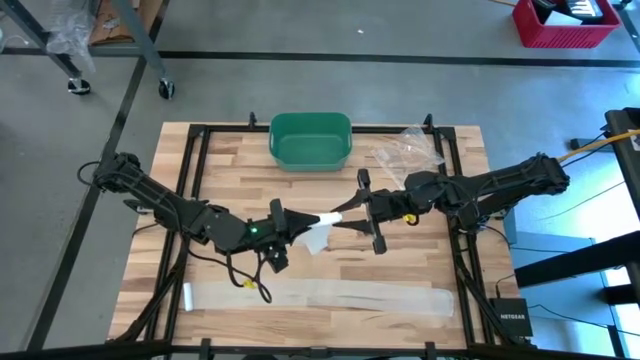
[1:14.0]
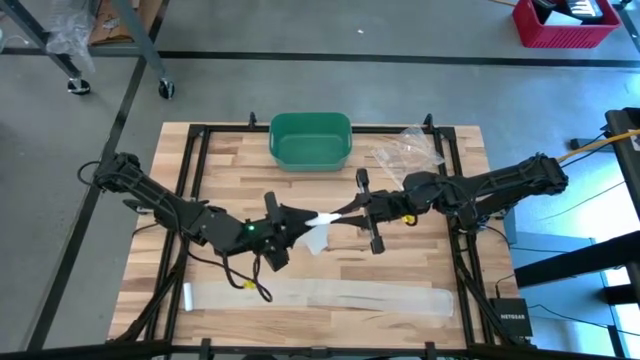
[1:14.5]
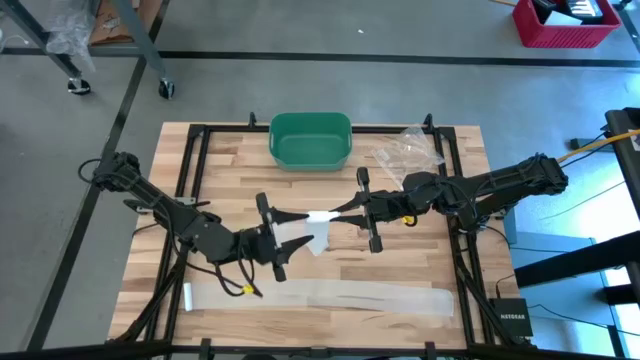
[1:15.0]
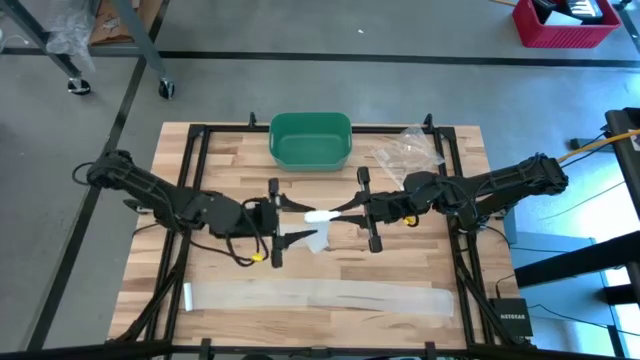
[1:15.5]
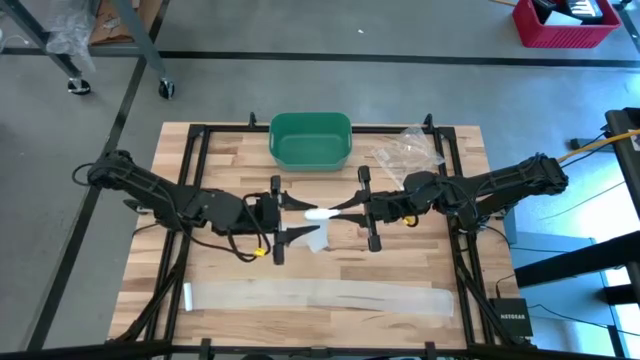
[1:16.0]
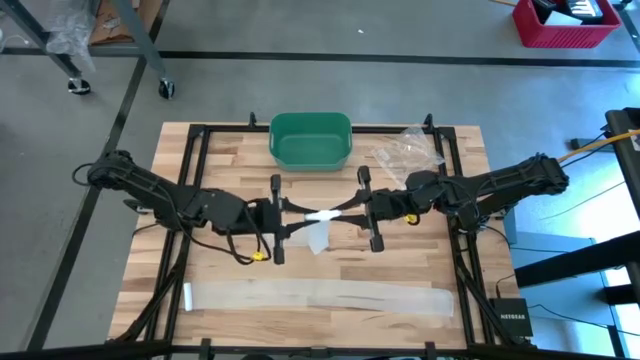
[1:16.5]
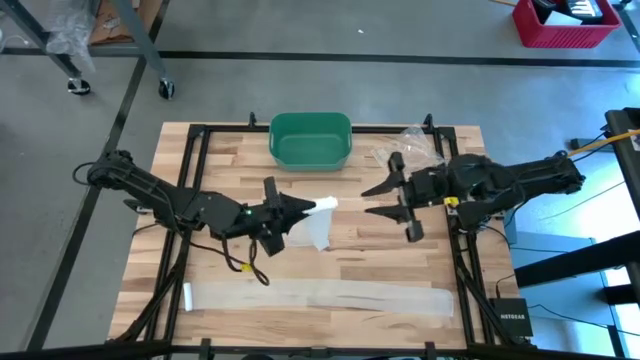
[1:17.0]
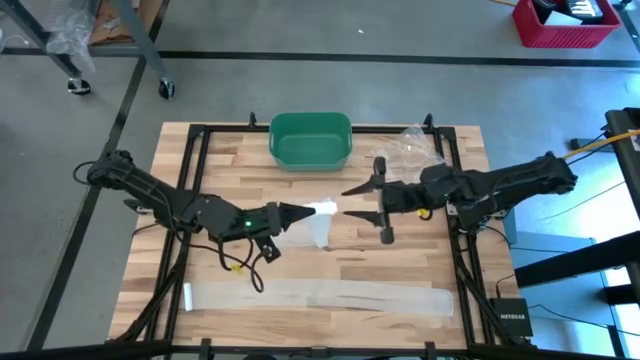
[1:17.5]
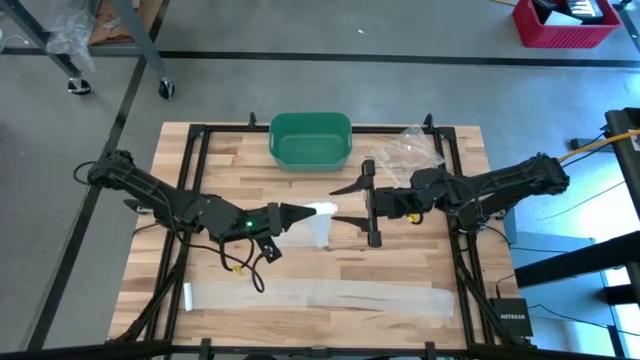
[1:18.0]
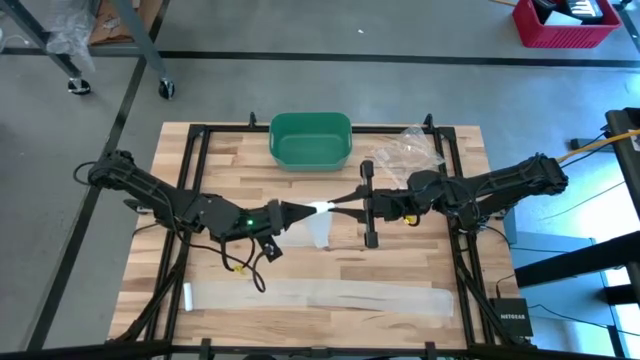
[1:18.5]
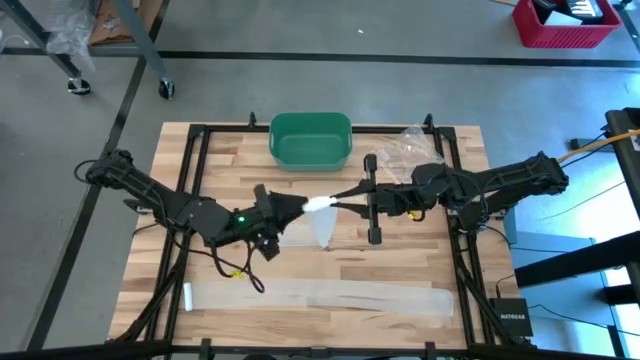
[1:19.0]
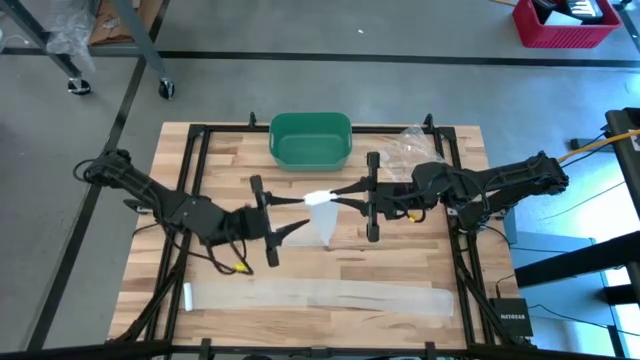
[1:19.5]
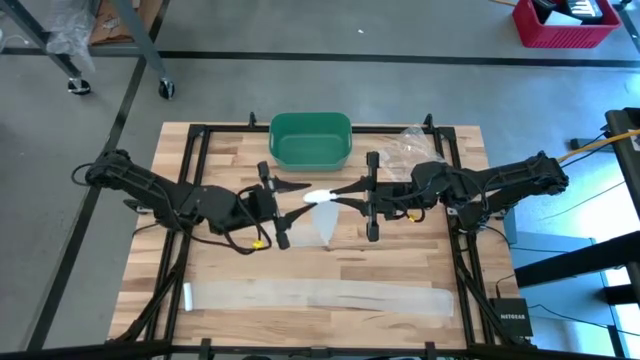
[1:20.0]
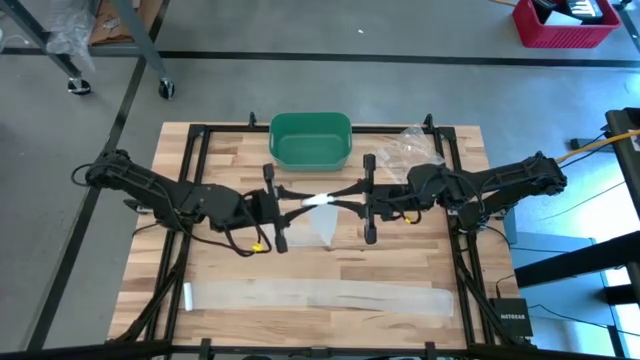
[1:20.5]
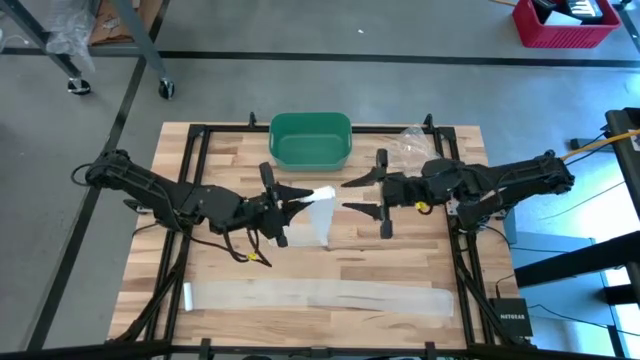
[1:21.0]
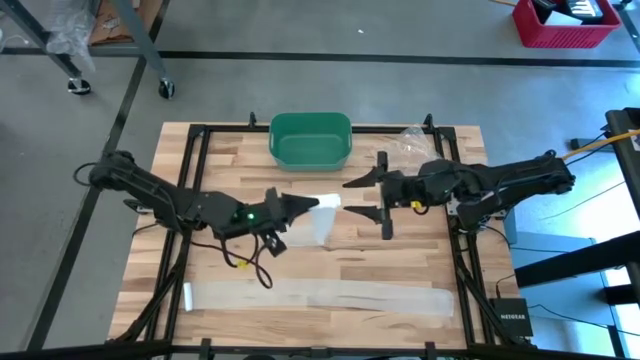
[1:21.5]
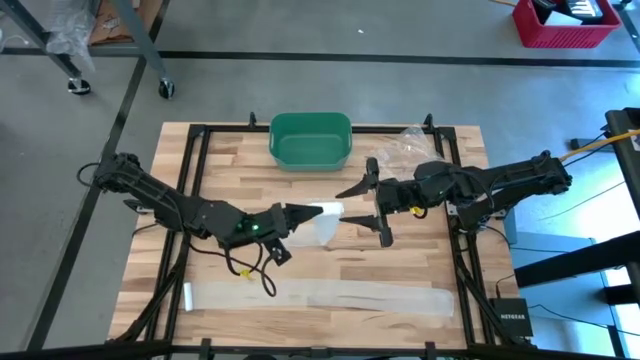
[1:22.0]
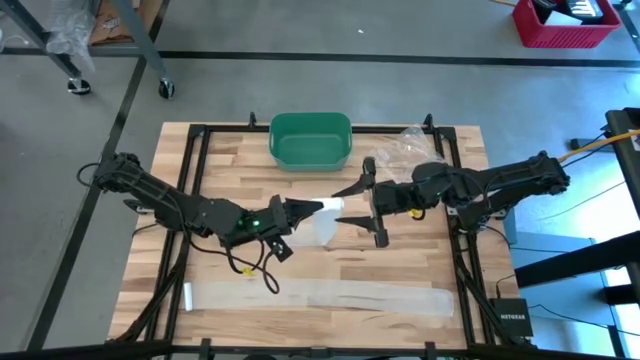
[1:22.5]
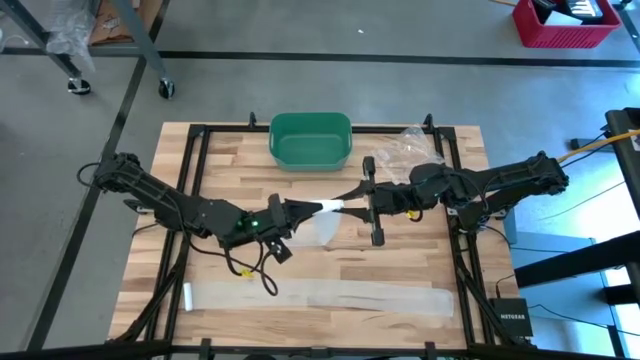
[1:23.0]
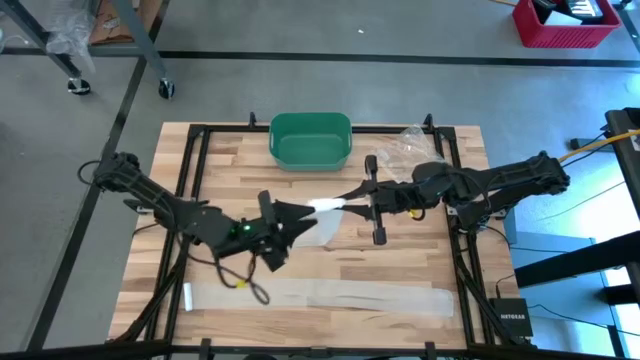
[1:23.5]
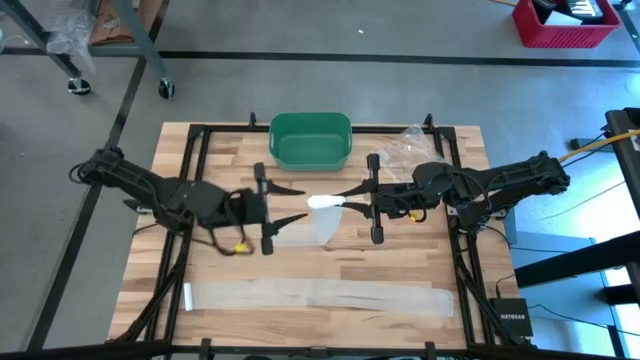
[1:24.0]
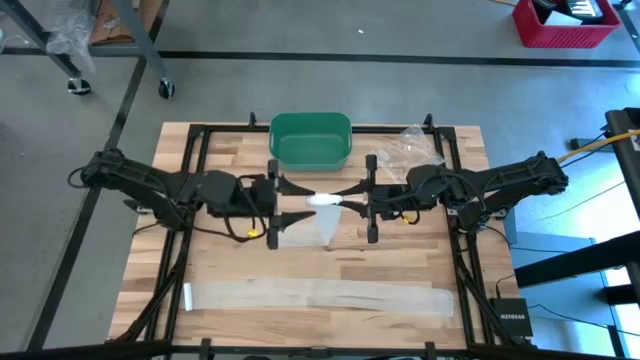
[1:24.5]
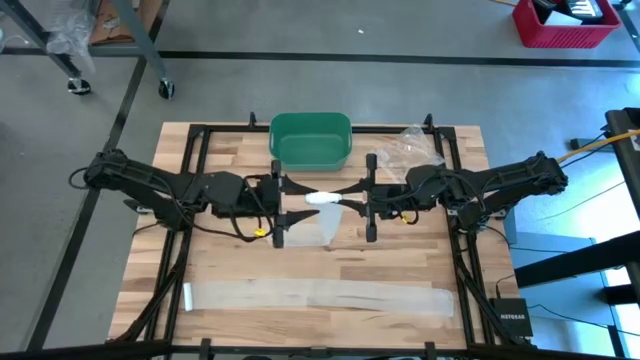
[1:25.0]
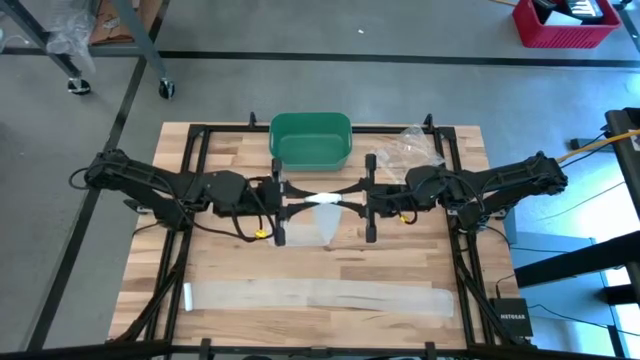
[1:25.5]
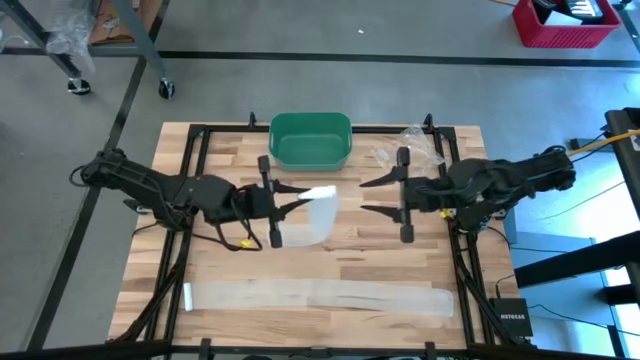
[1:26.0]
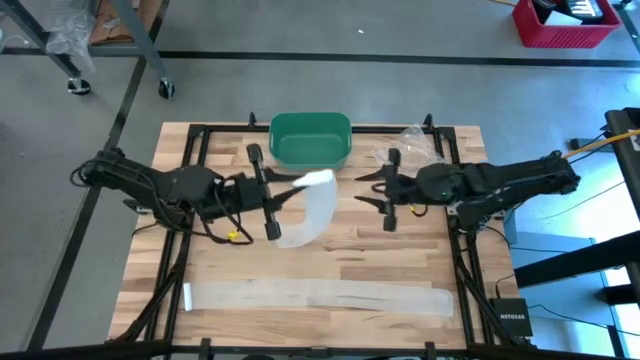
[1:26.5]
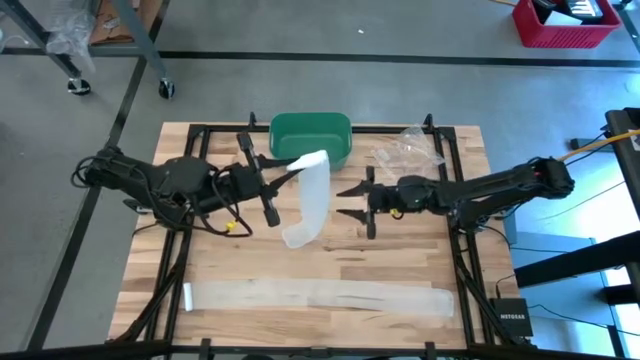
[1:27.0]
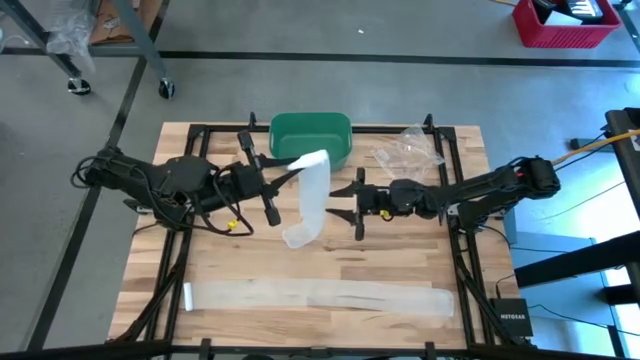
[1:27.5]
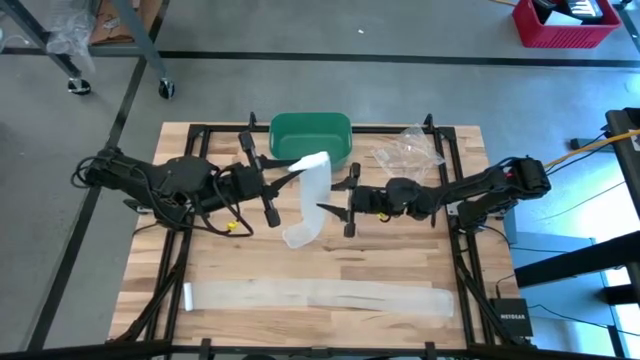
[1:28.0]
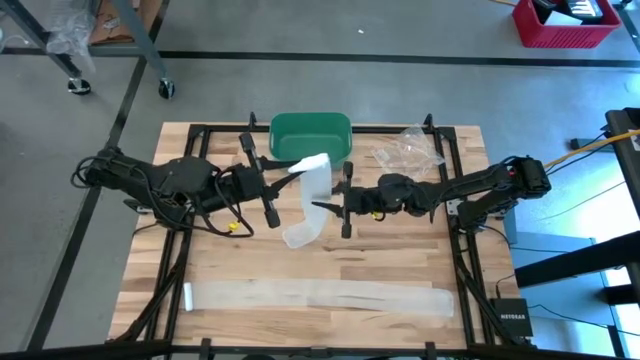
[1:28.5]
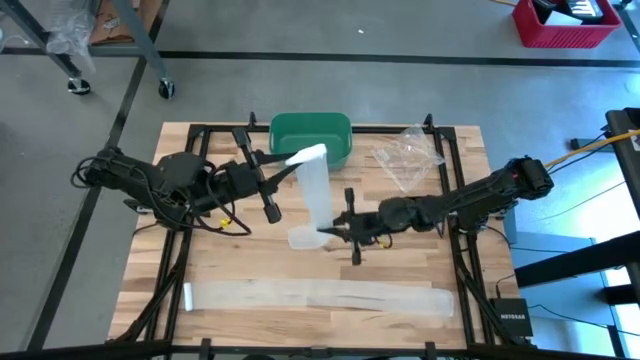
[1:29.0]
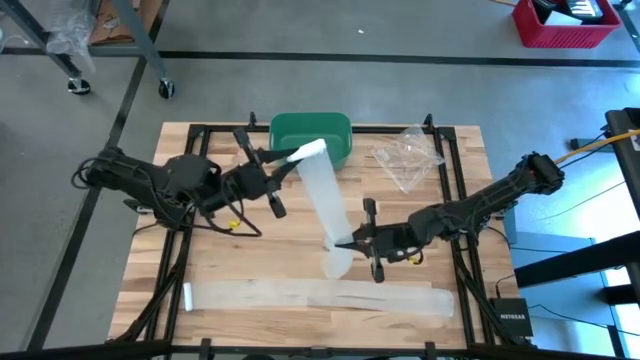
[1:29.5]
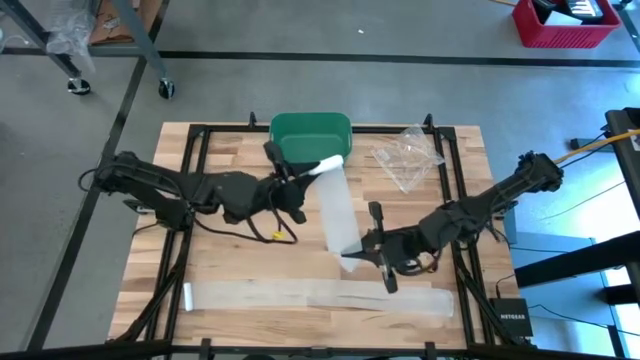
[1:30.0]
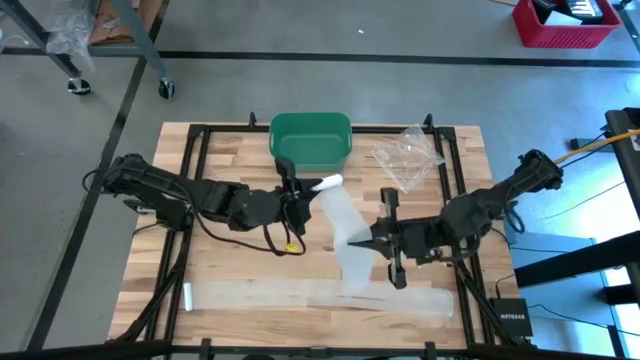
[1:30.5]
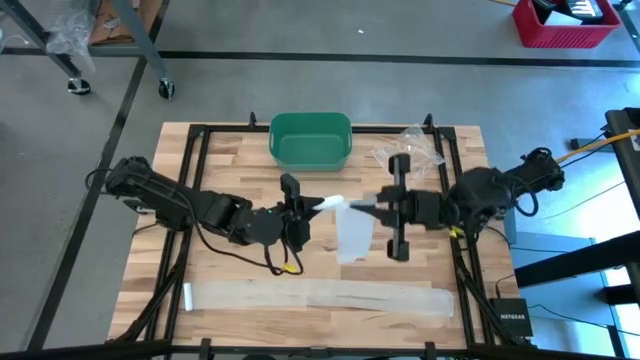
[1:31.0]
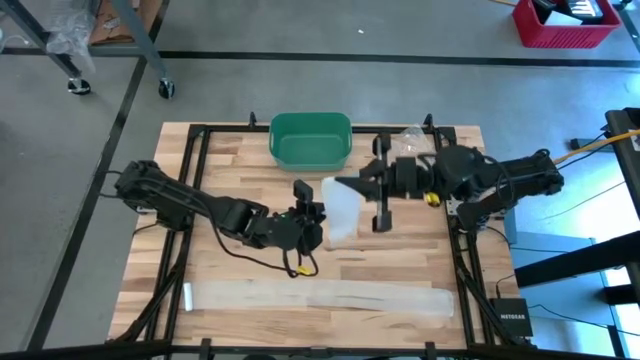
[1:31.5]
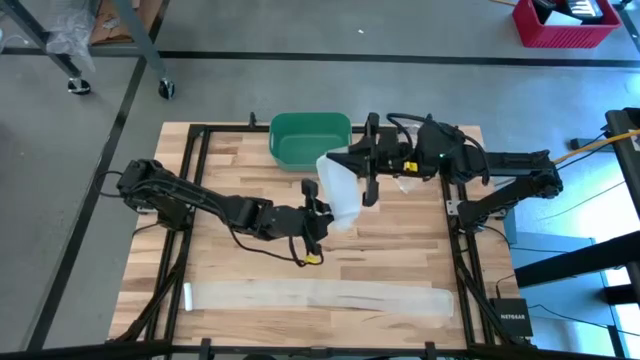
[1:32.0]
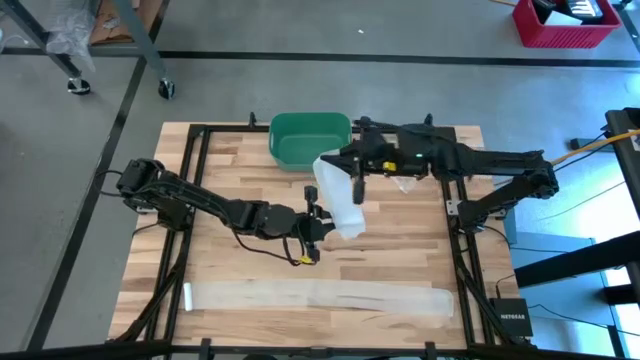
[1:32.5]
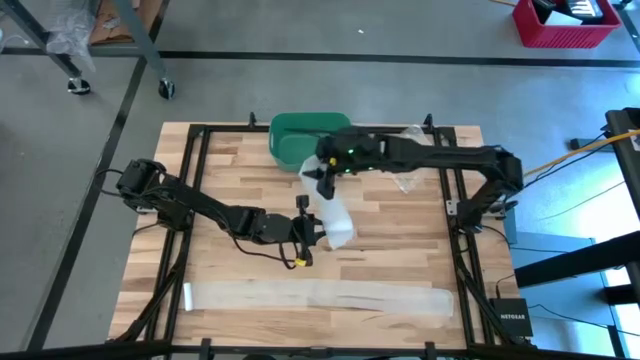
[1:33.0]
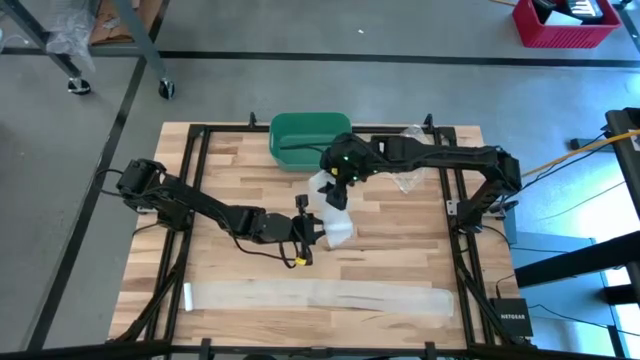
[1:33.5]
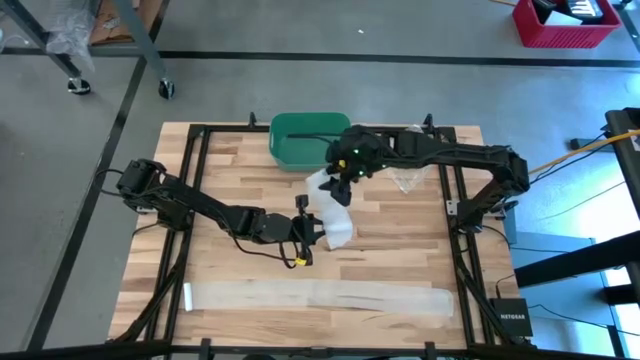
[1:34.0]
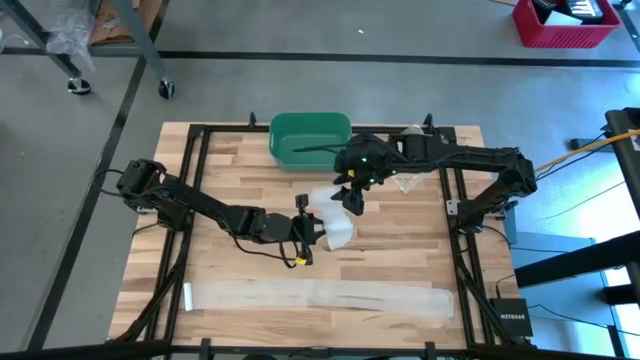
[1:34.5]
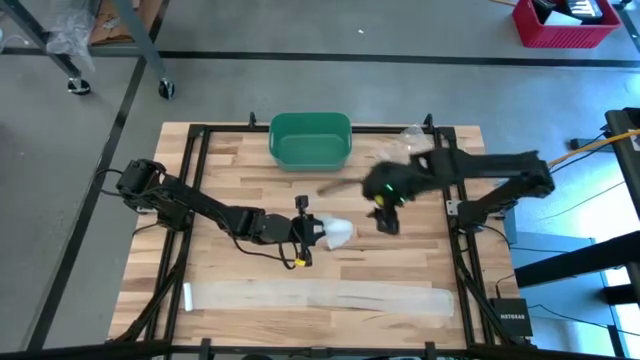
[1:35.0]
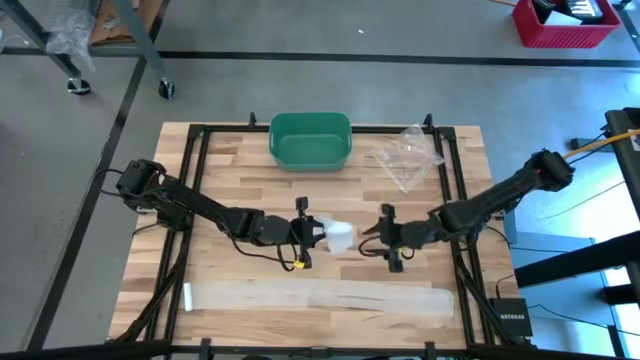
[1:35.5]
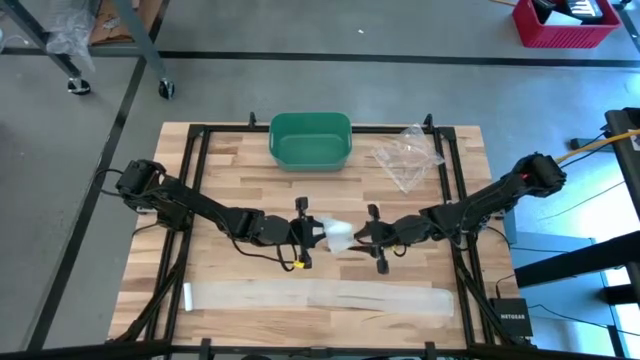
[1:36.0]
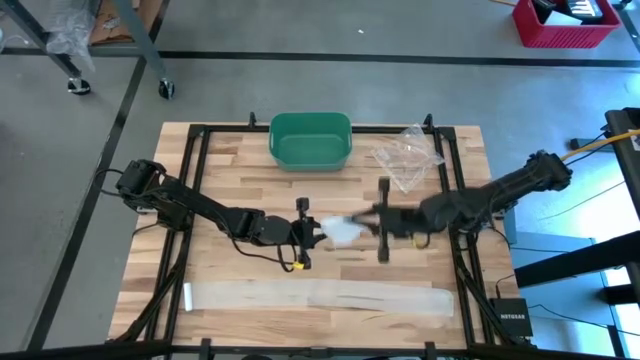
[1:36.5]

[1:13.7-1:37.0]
Task: Roll bandage
Roll the top white bandage
